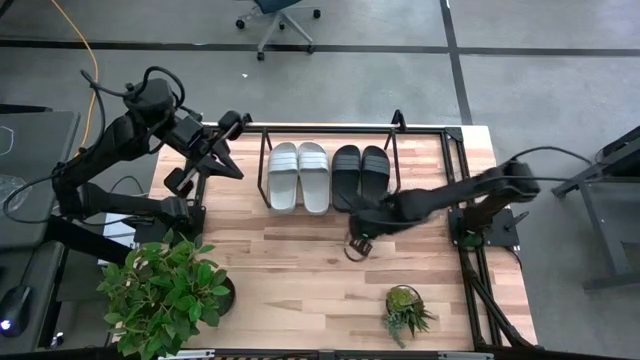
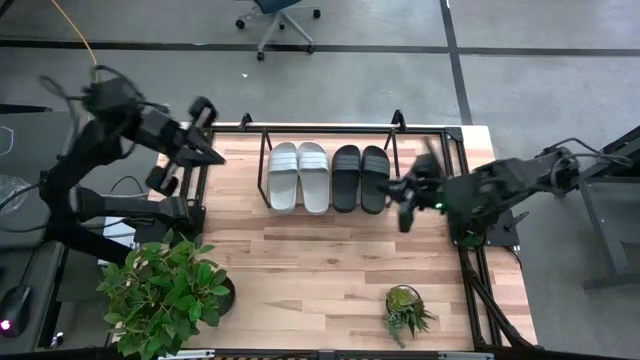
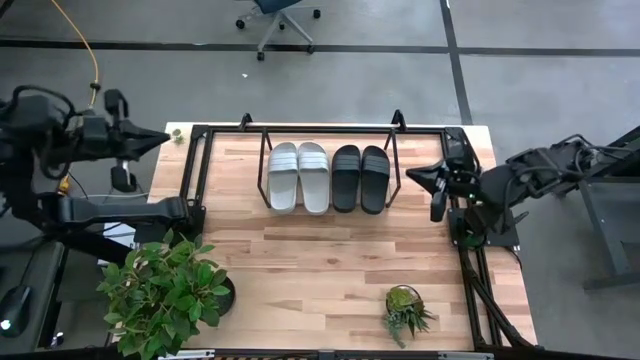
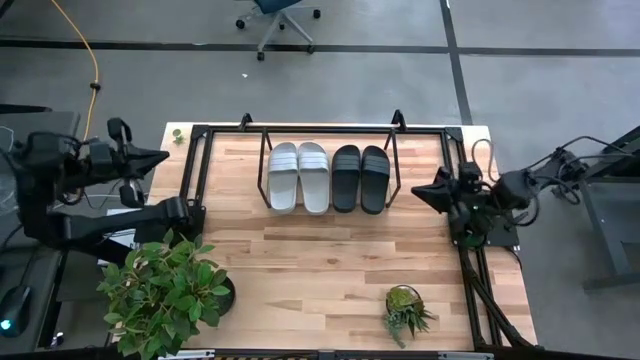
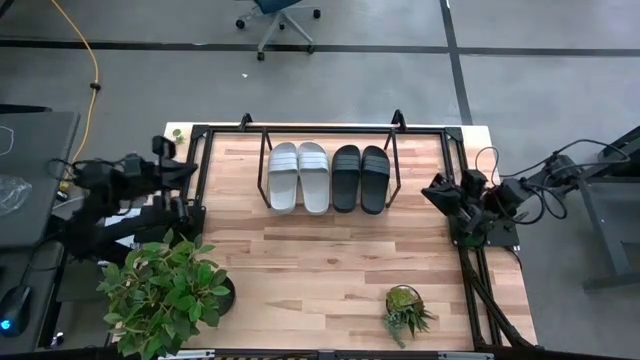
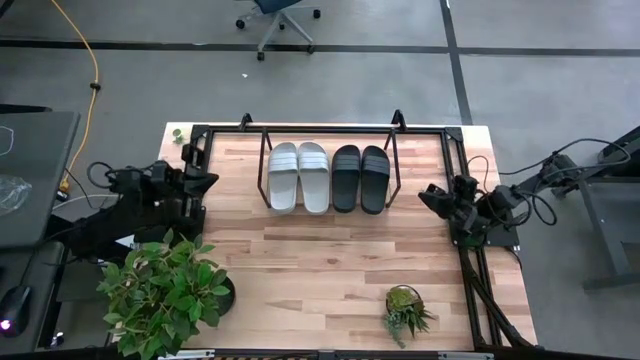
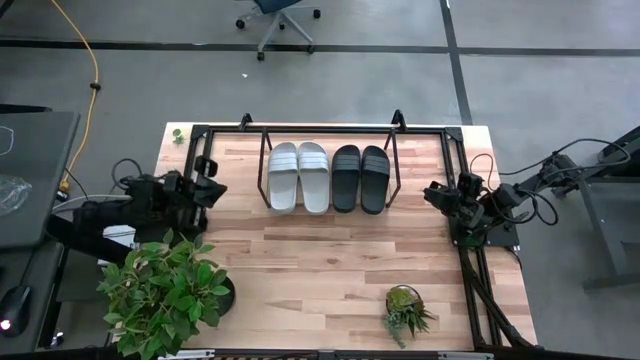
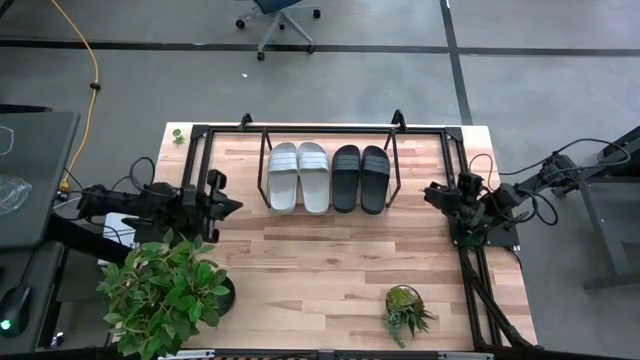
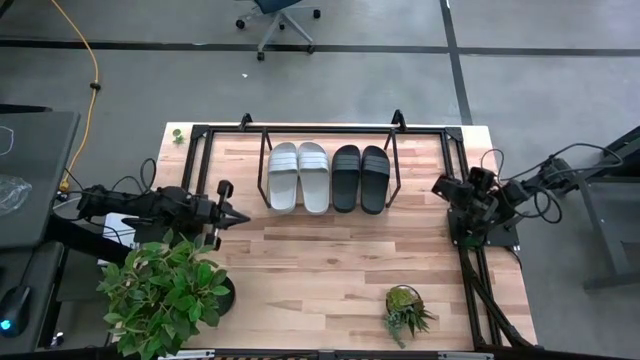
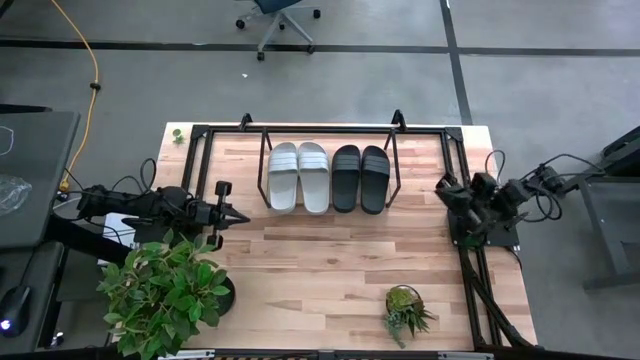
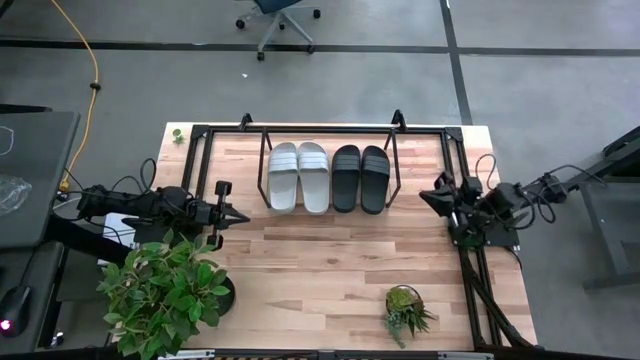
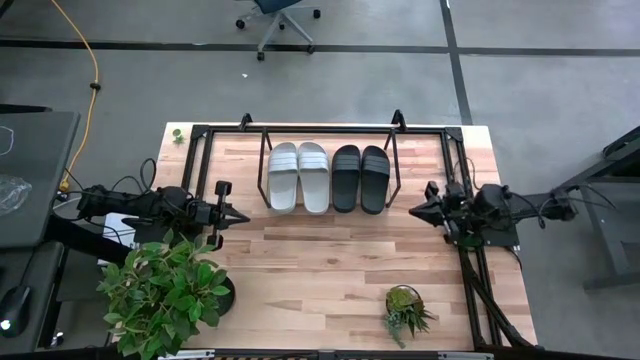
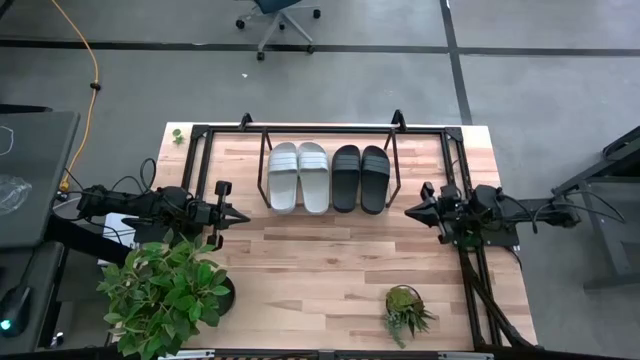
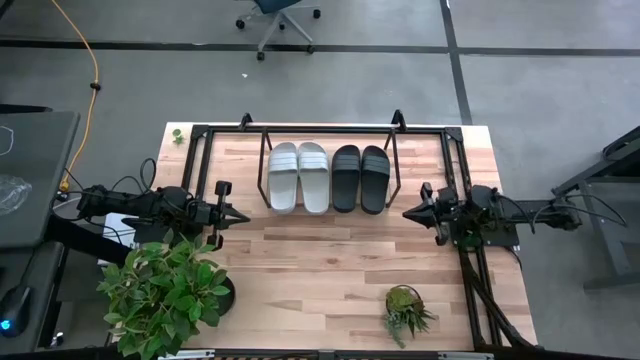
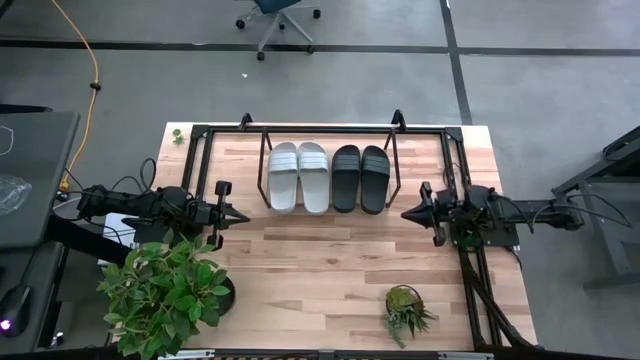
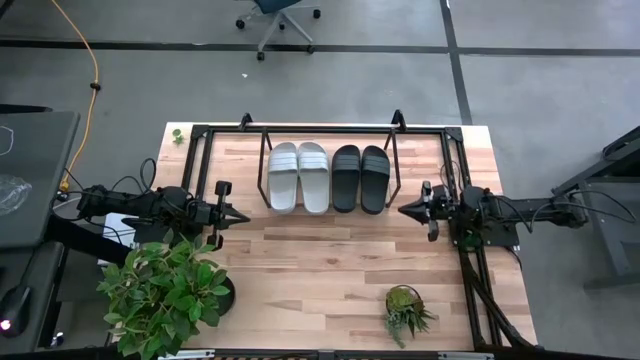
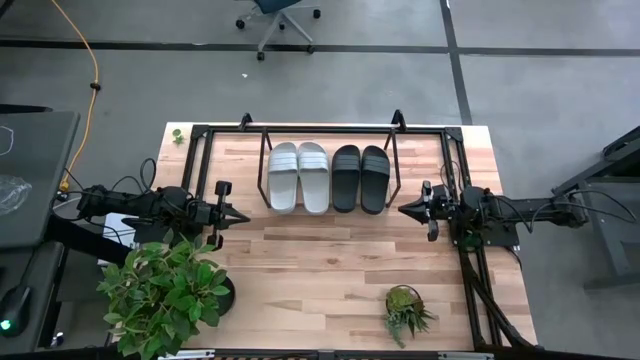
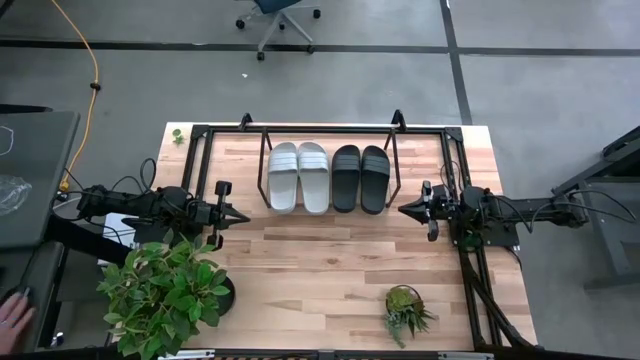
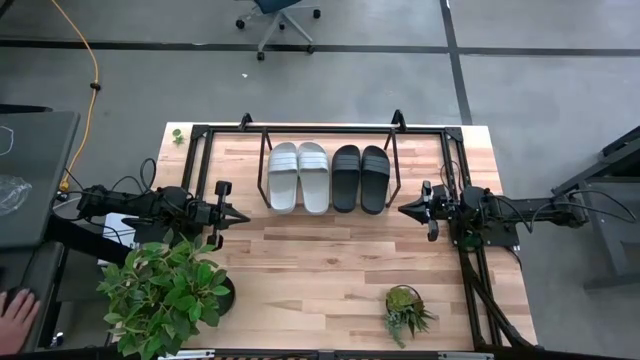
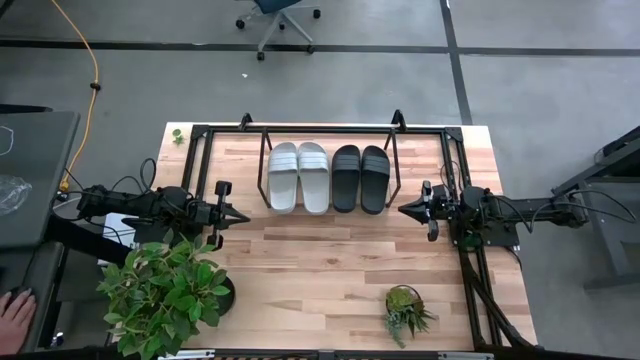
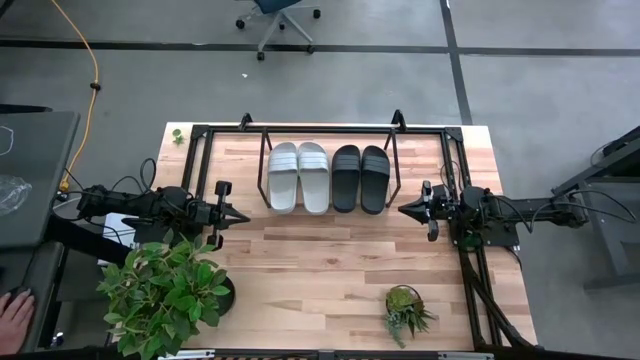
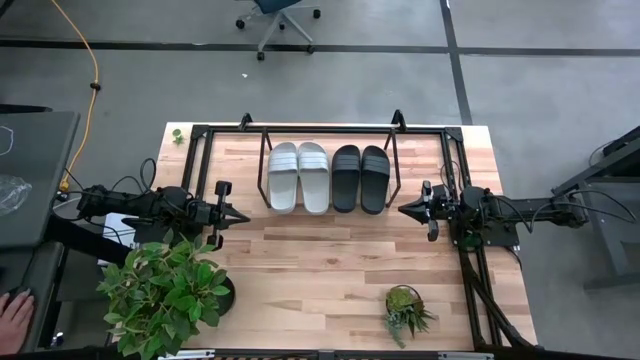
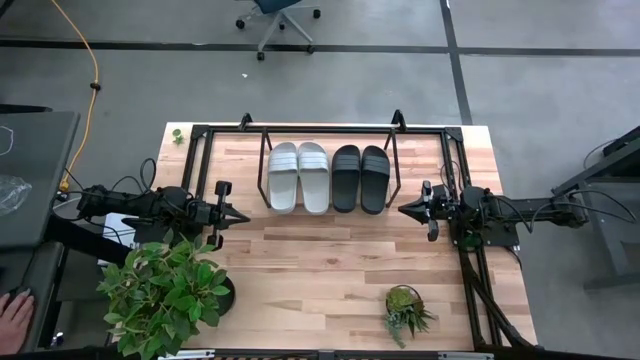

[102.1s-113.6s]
Task: Pick and place slides into the shelf
Return to Home Position

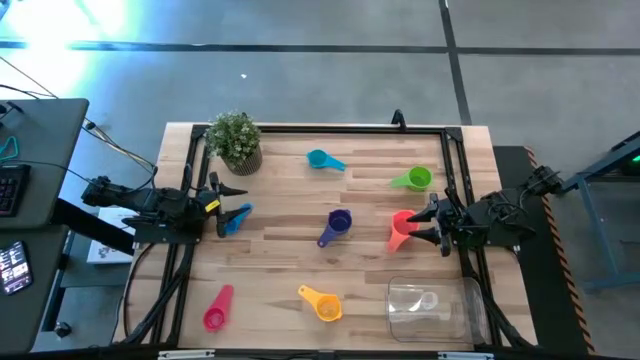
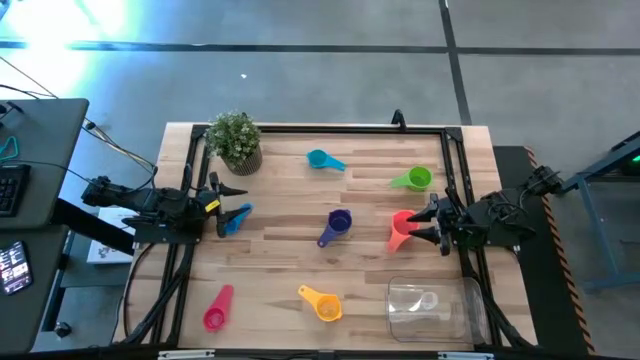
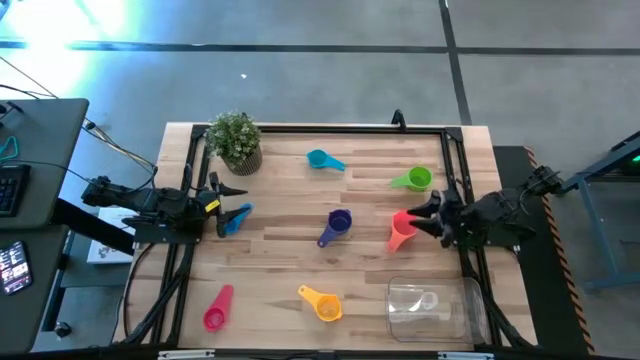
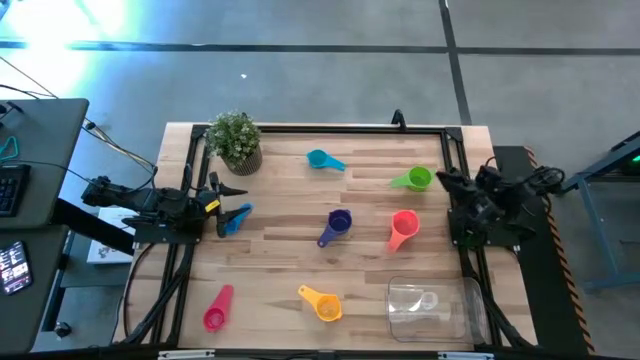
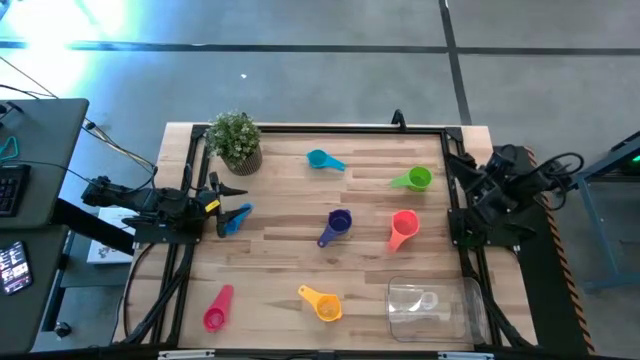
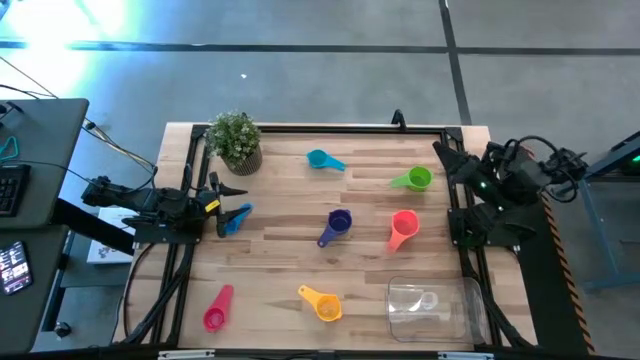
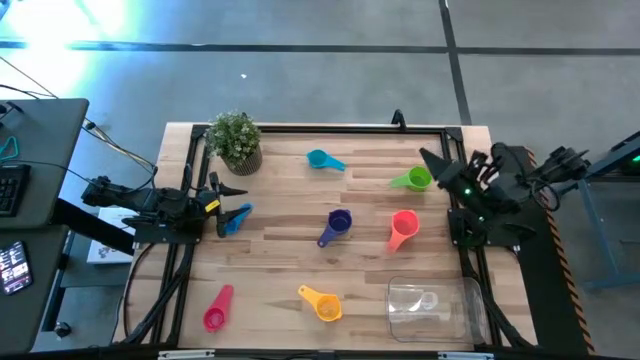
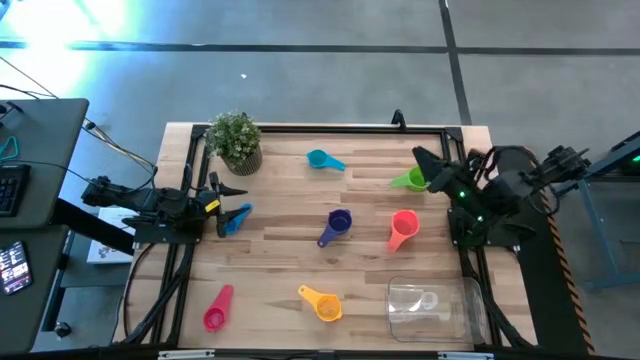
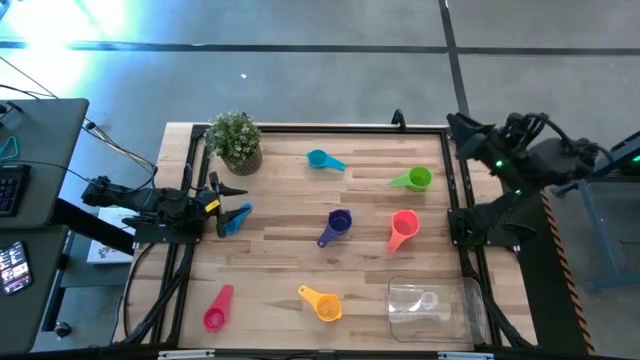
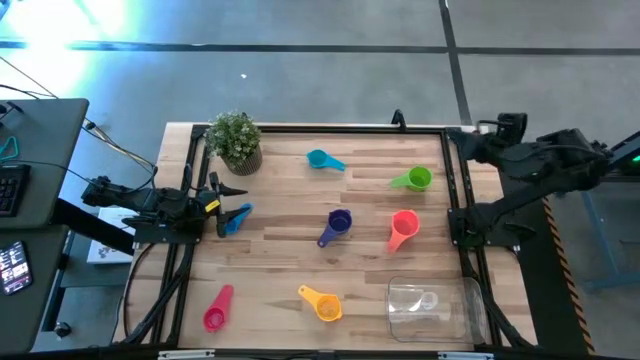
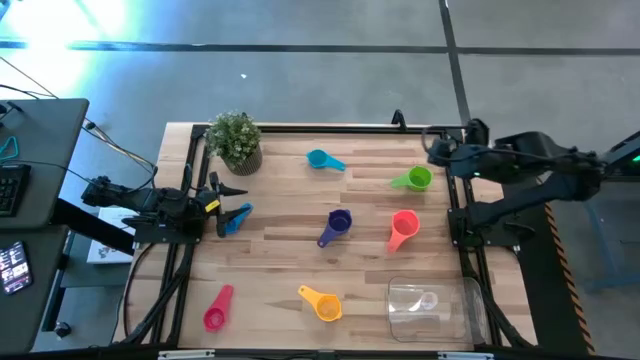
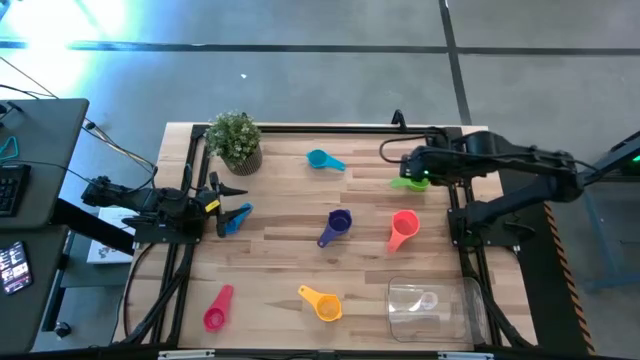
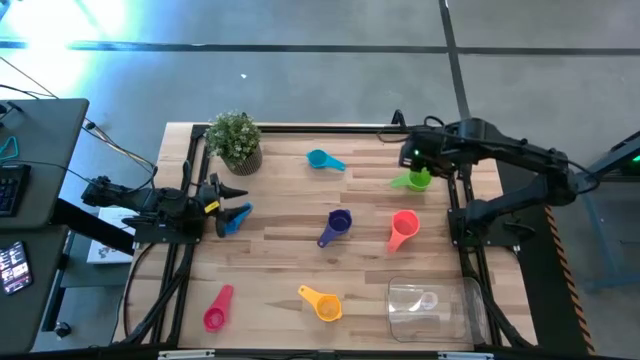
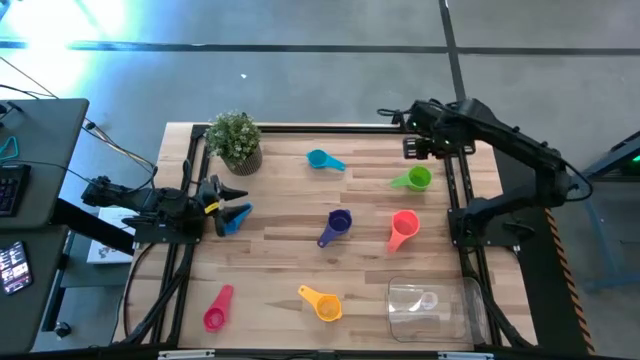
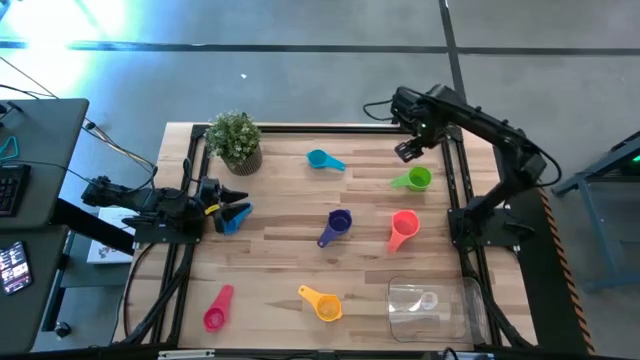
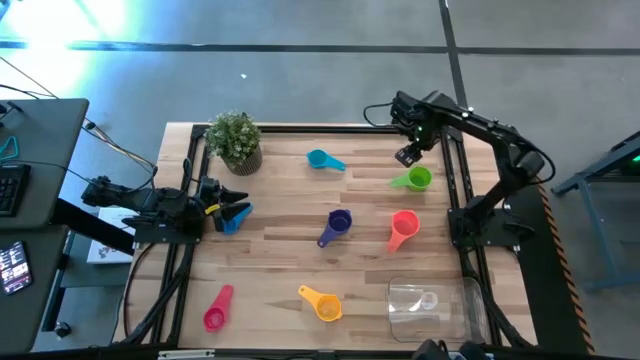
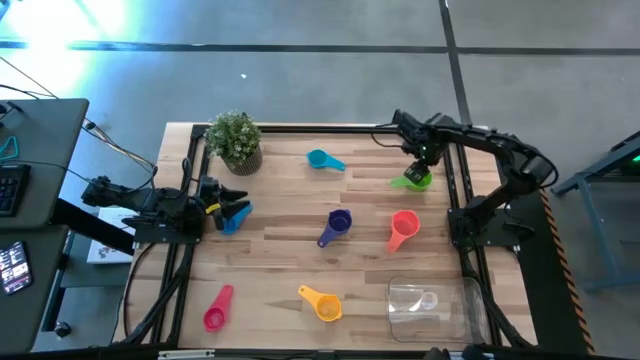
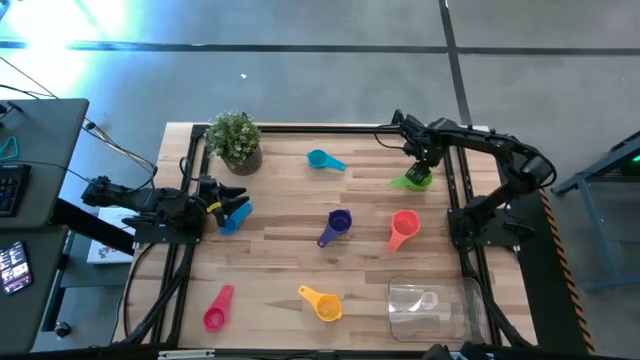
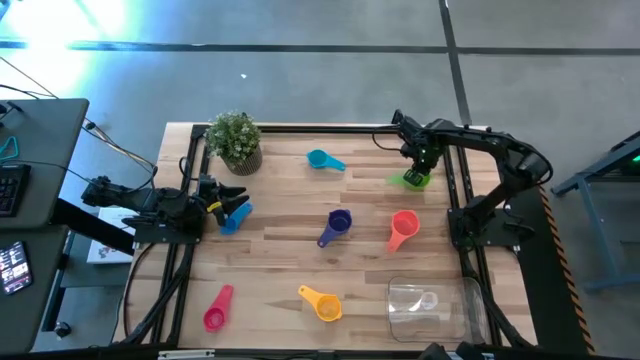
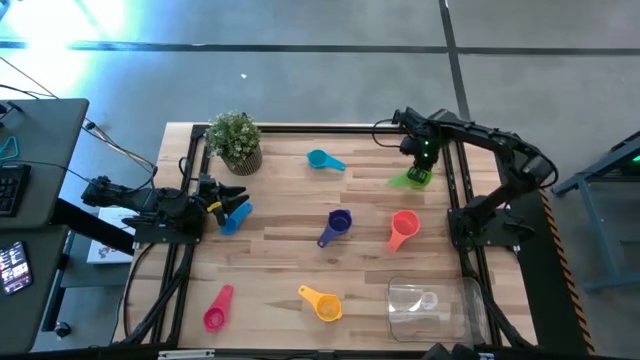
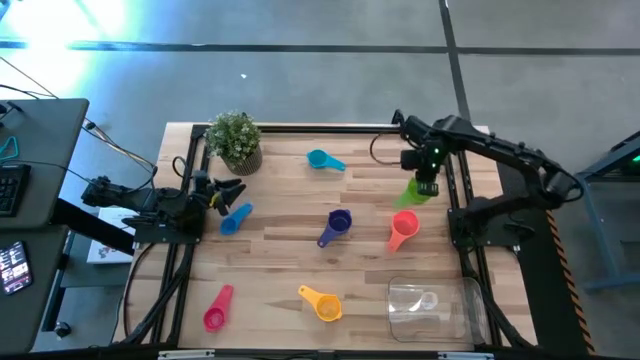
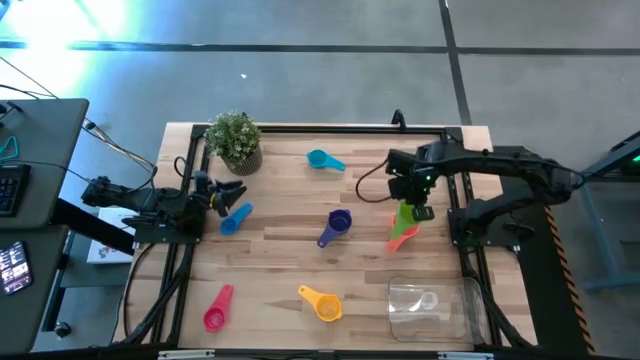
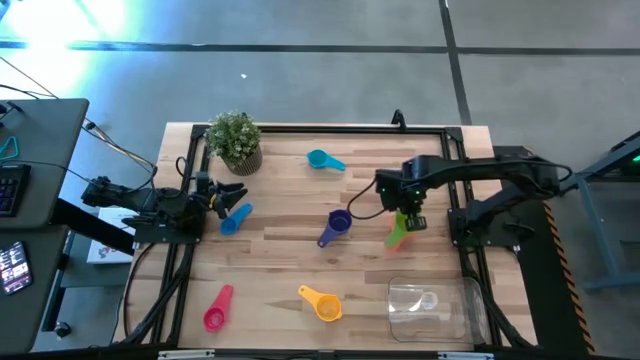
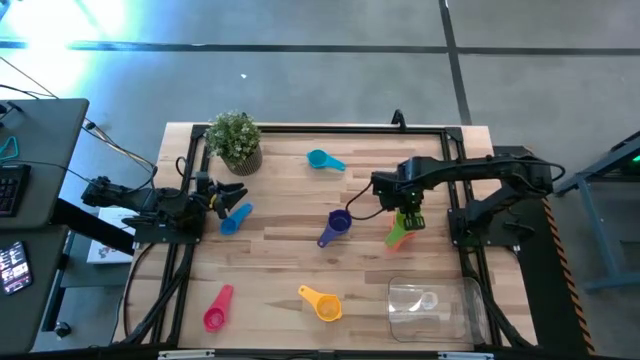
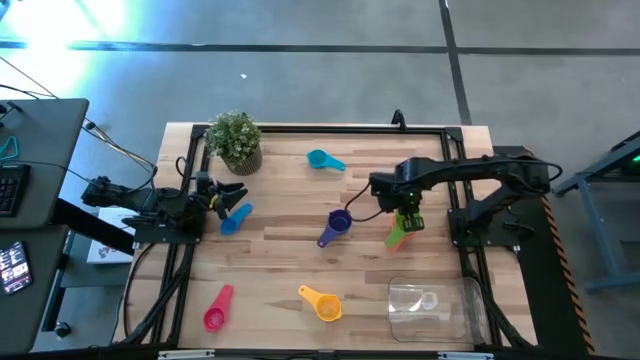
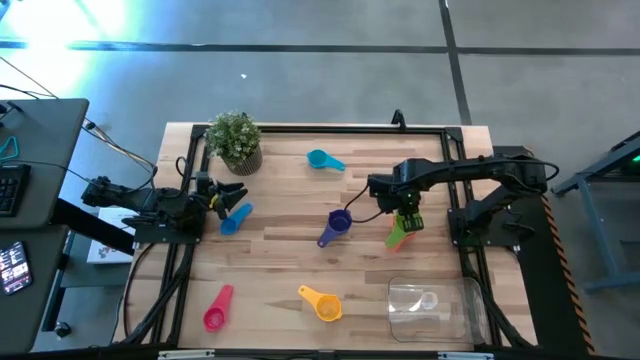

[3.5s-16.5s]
Task: Nest measuring cups in basket
Stack the green measuring cup on top of the orange measuring cup
